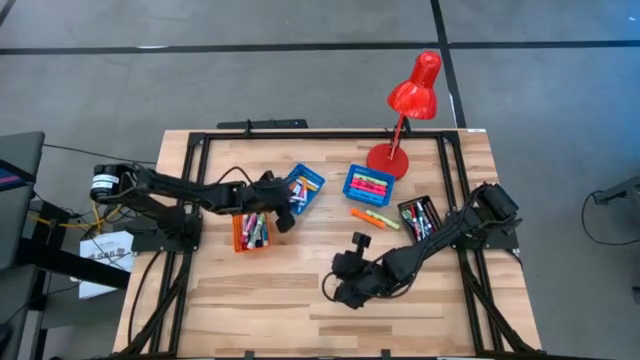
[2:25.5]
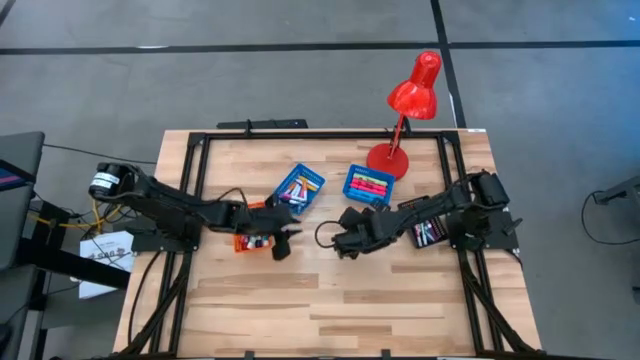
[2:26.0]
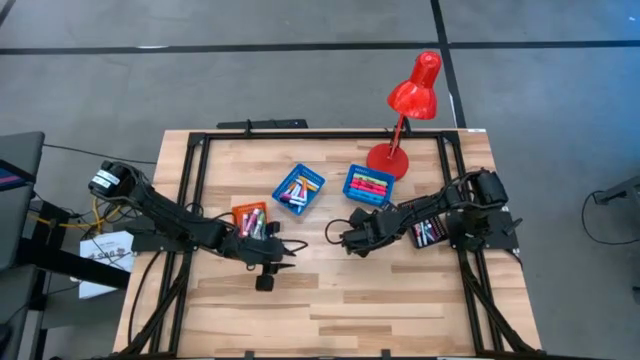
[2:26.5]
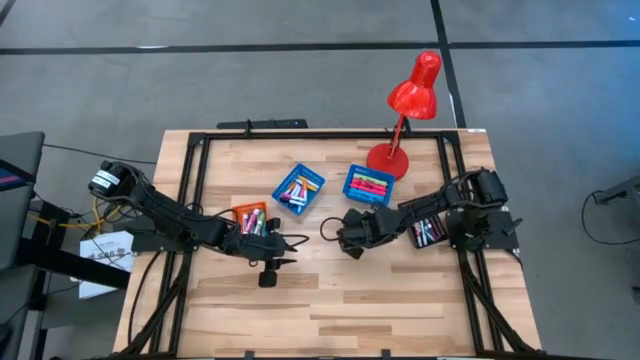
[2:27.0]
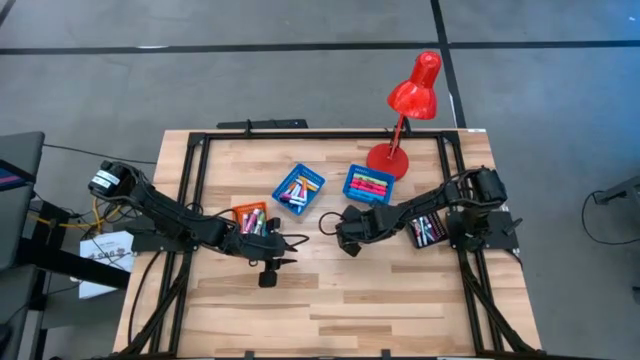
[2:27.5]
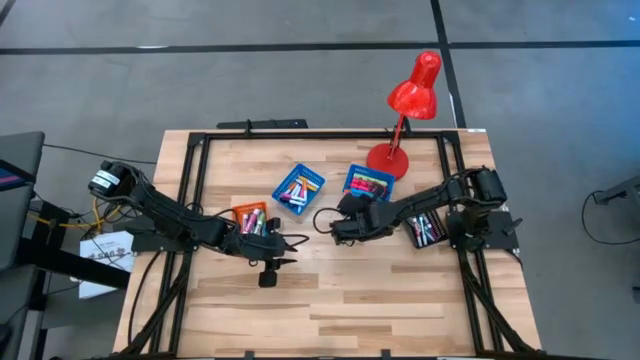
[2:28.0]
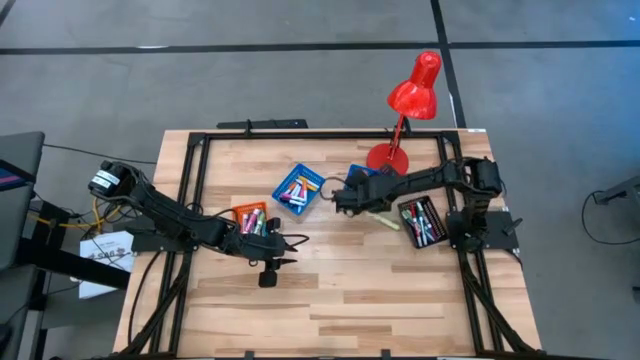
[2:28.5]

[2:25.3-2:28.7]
Task: Pick & Place Markers
Put the large orange highlighter pen into the right blue bin

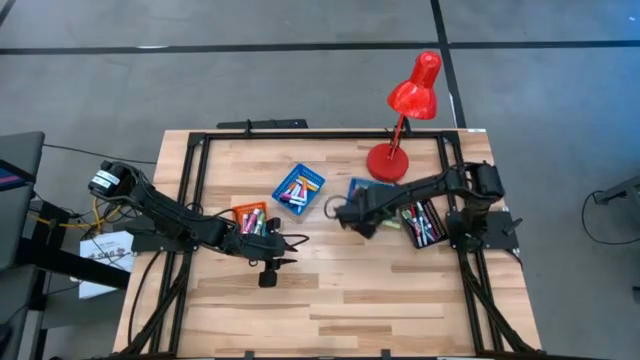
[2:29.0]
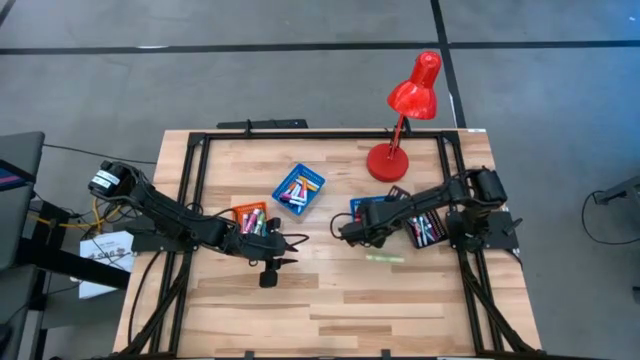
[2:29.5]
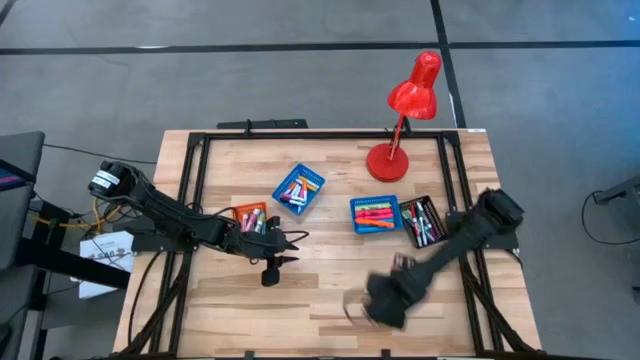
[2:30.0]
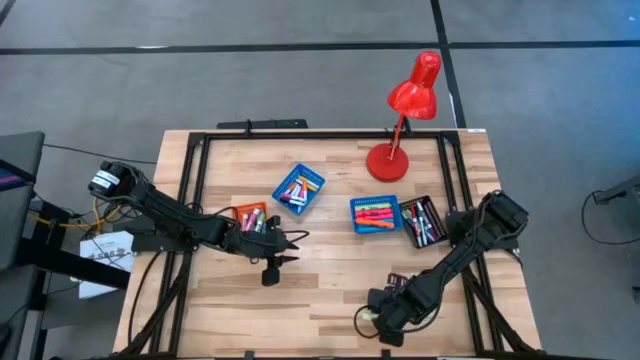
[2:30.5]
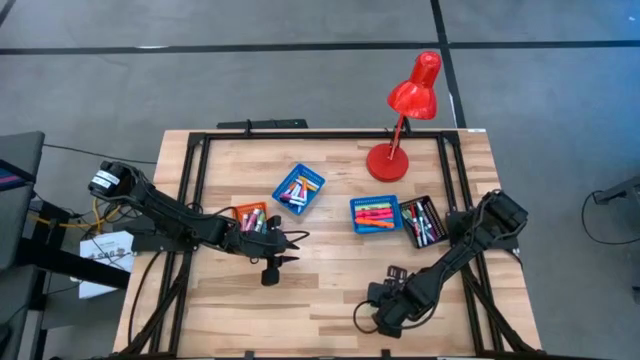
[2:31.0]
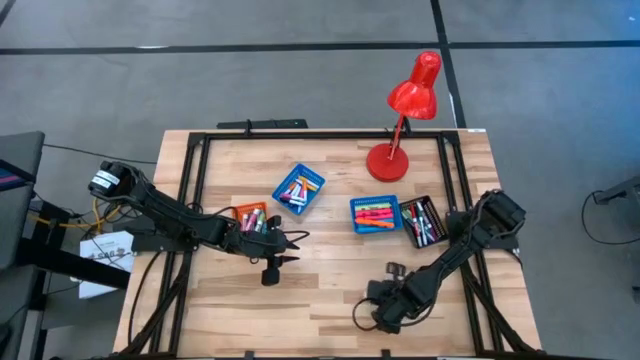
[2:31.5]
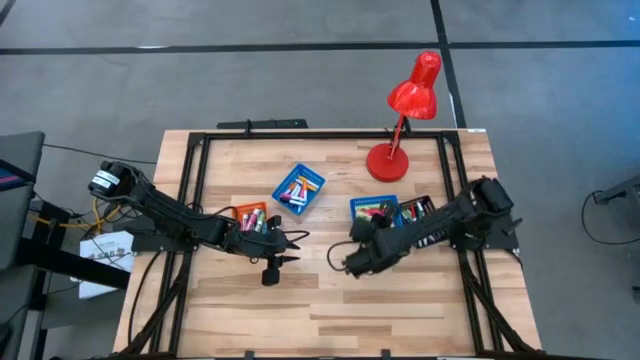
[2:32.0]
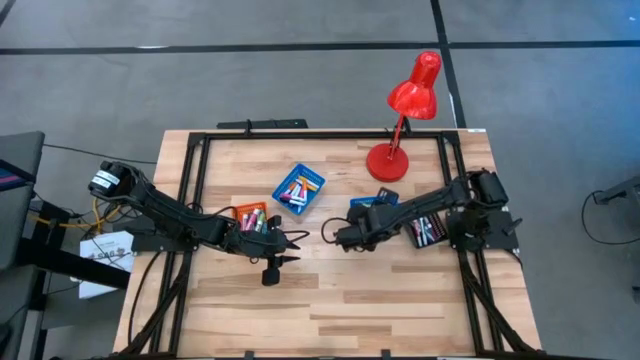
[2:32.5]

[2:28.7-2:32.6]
Put the large light green highlighter pen into the right blue bin

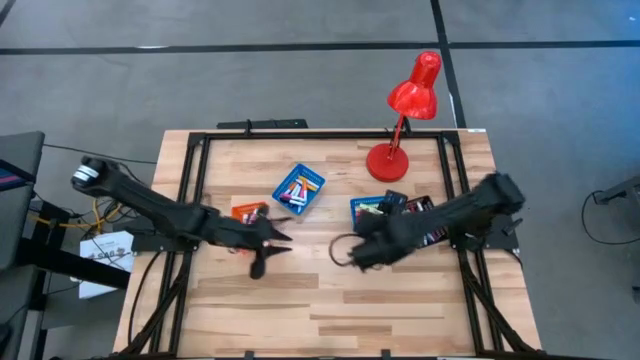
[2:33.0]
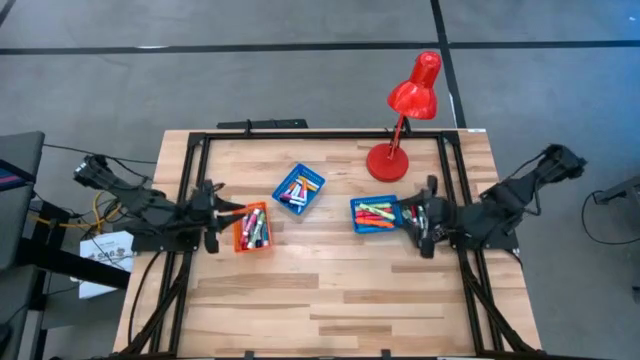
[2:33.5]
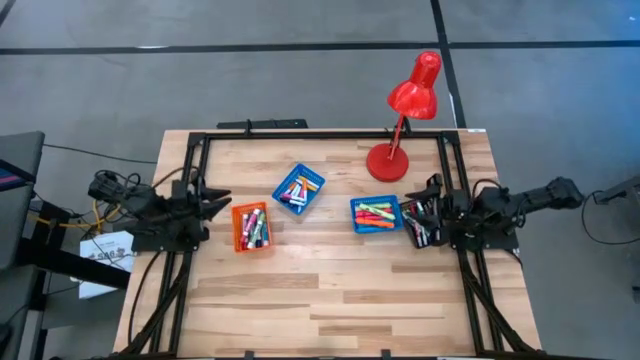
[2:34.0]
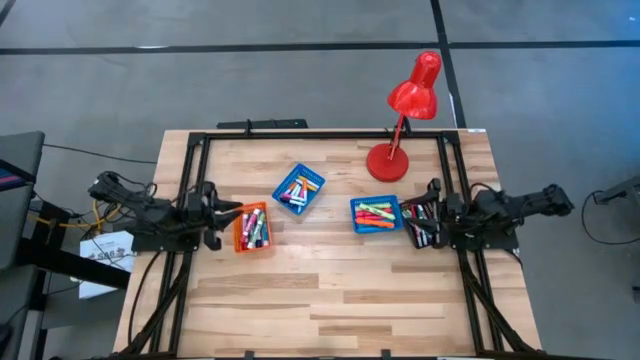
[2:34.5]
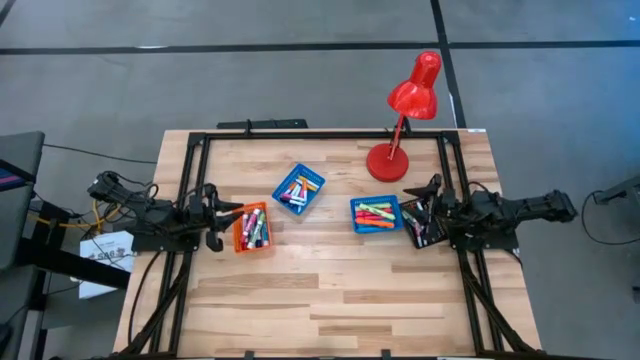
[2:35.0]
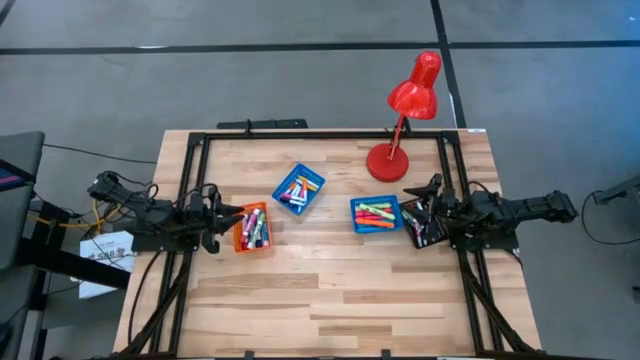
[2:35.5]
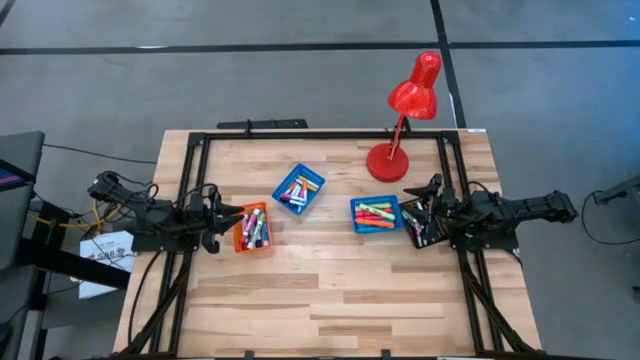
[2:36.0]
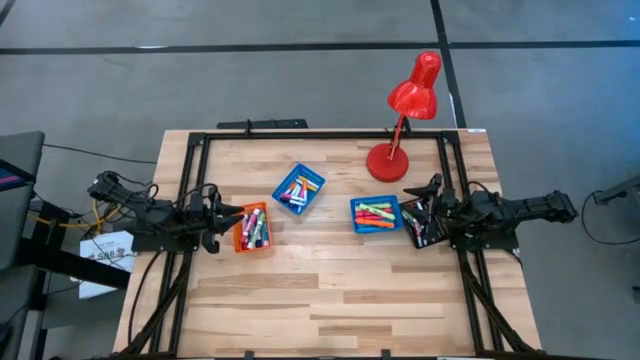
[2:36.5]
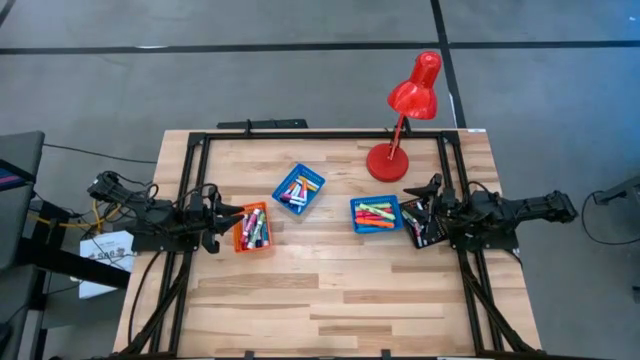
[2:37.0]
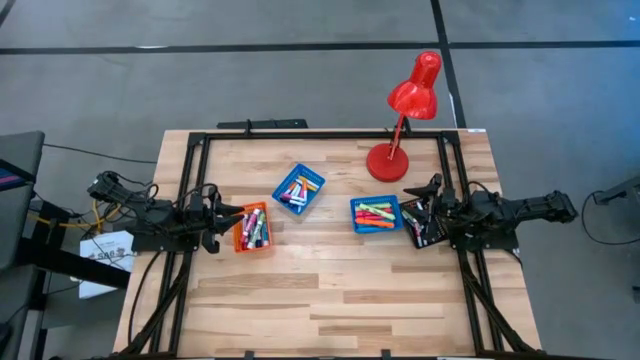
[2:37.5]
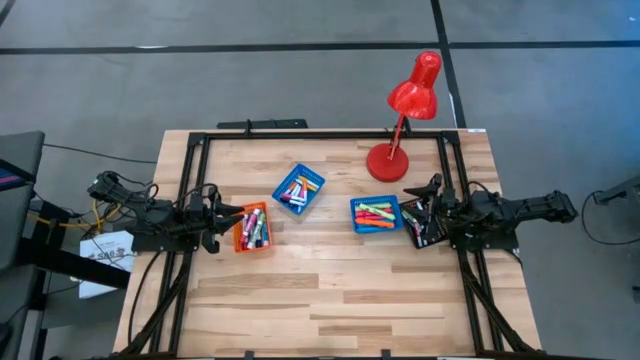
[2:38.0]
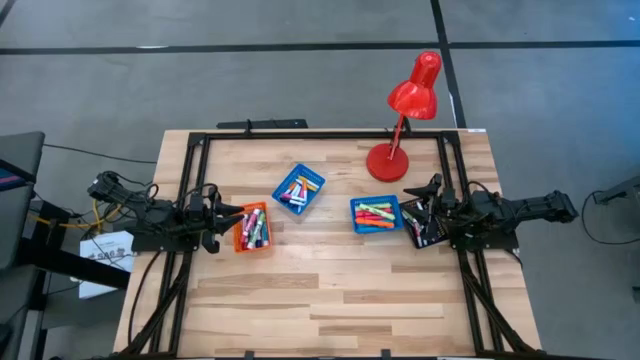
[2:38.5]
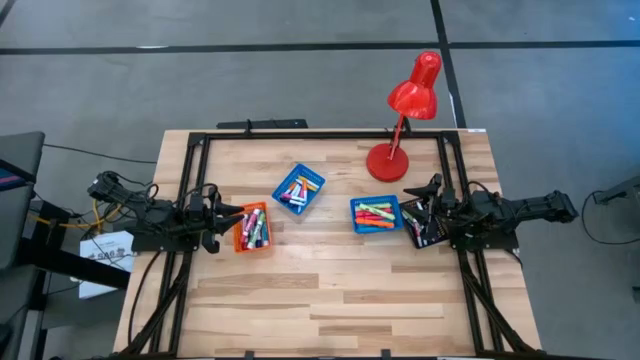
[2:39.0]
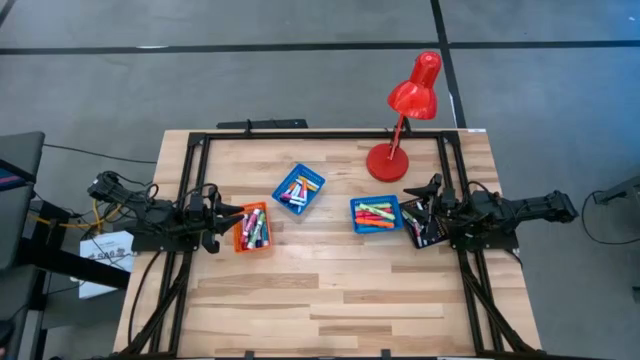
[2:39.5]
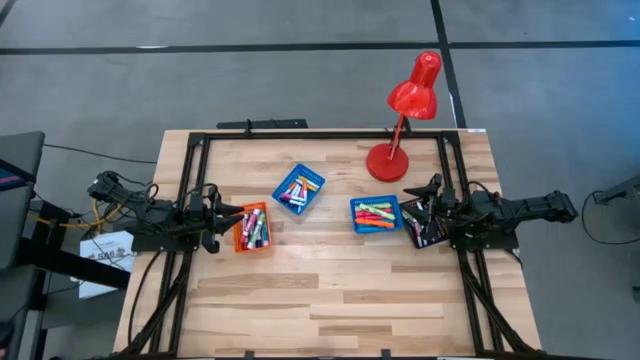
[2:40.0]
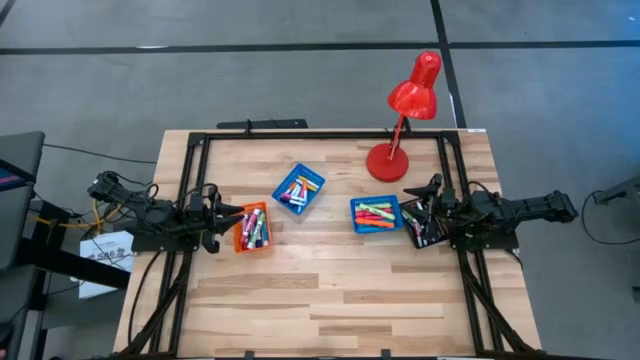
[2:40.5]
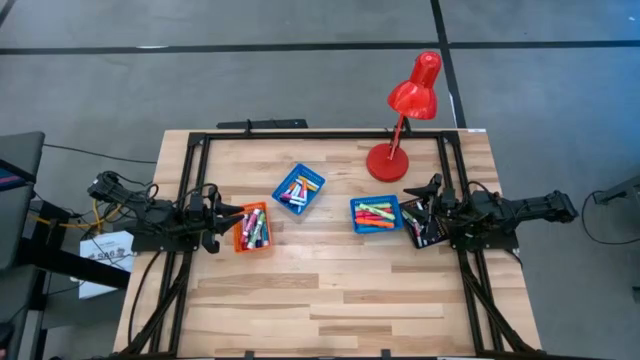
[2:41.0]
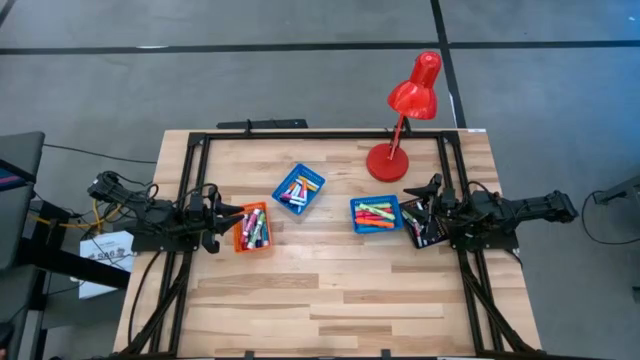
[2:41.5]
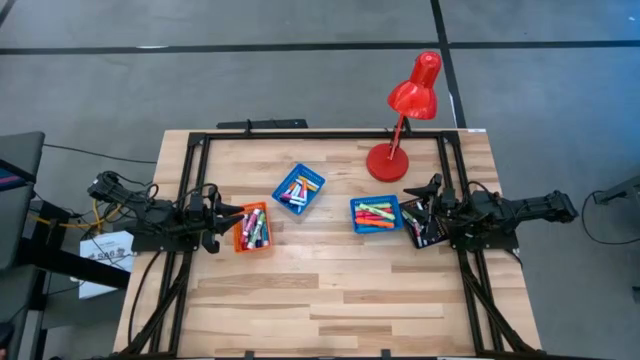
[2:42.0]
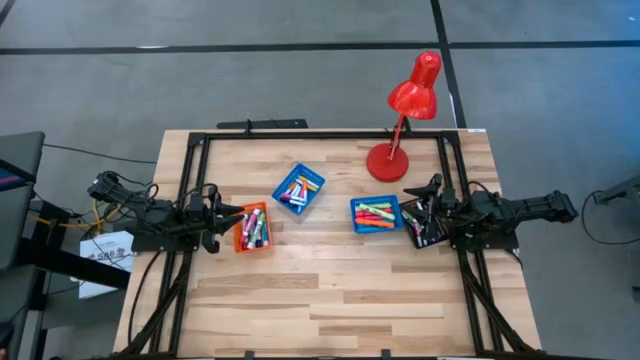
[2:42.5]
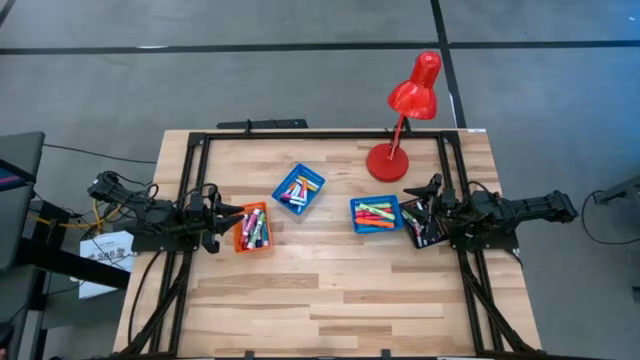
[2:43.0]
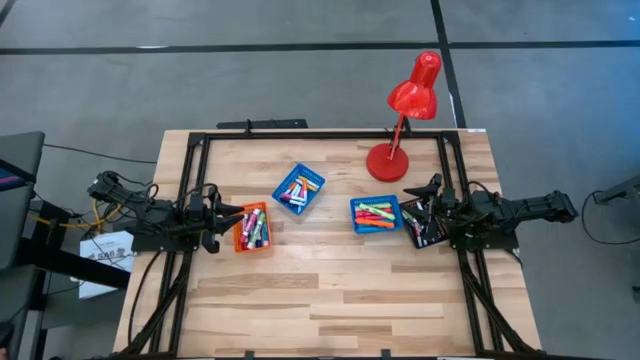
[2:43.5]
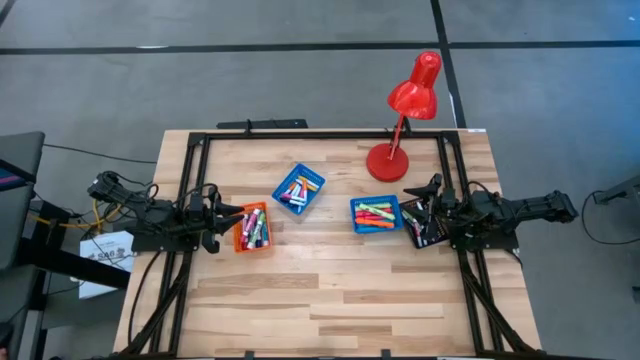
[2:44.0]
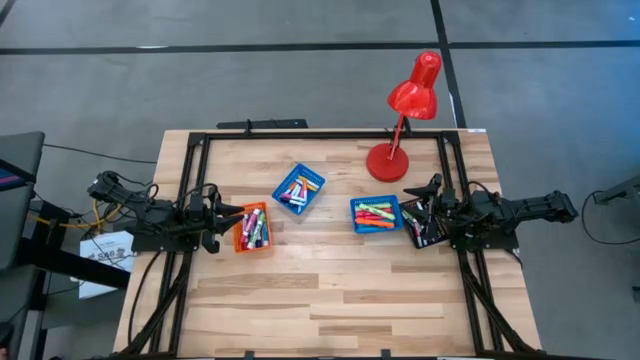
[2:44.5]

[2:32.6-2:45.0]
Return to Home Position

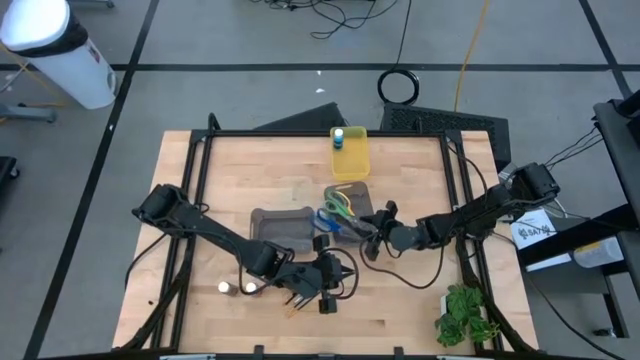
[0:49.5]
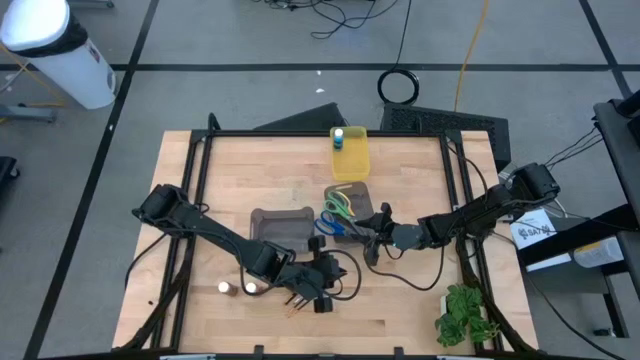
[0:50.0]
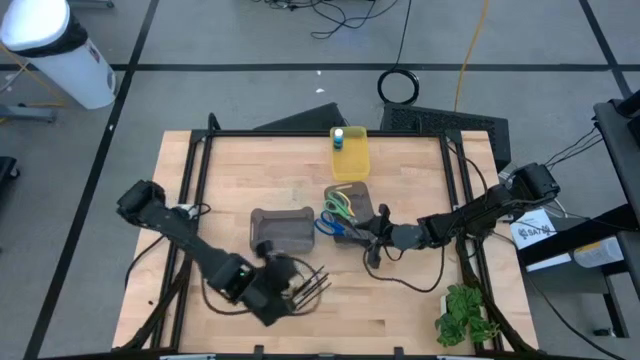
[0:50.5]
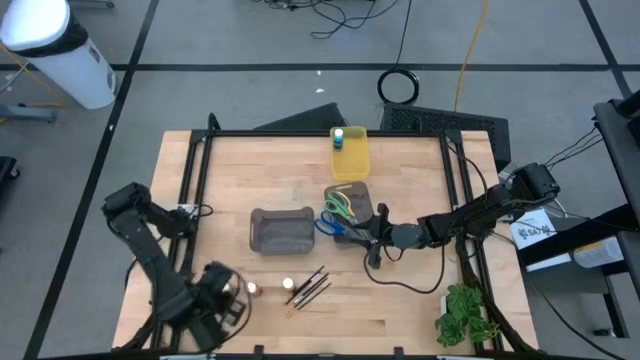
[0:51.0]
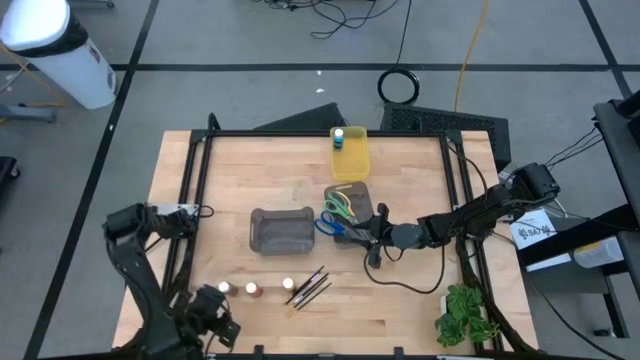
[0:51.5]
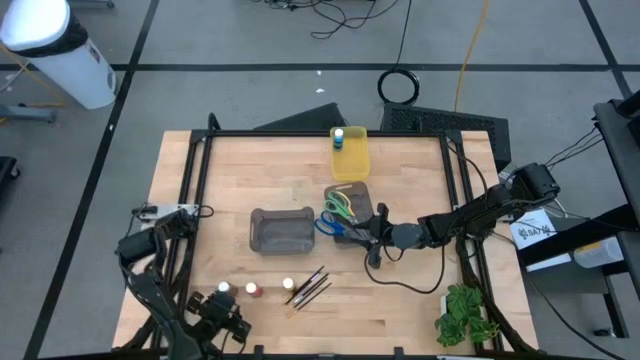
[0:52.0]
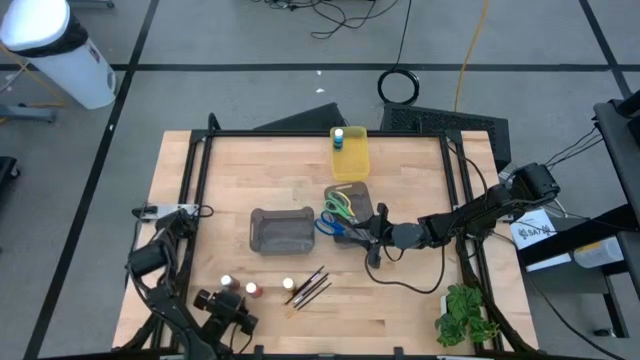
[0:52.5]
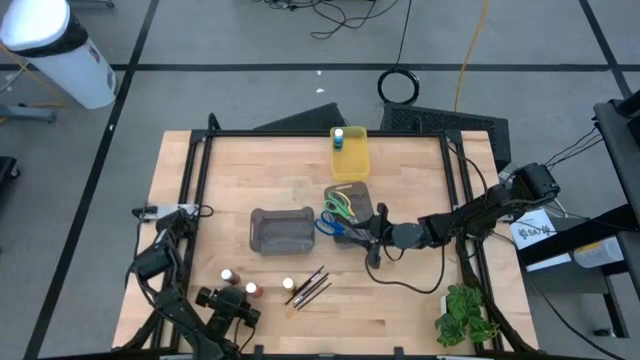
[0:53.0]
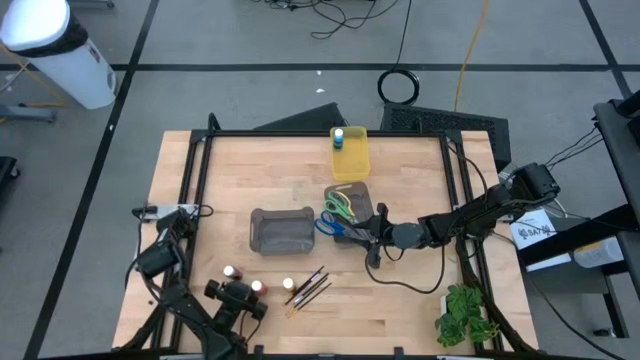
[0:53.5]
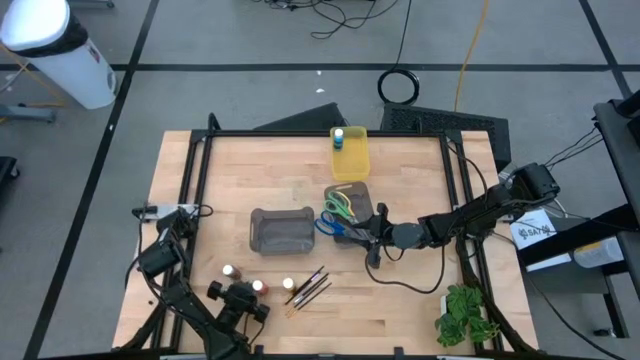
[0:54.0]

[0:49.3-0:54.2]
Task: Pick & Place Paint Supplies
Put the orange paint bottle into the yellow bin
